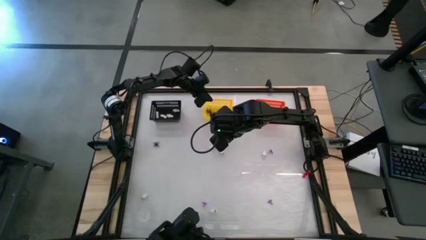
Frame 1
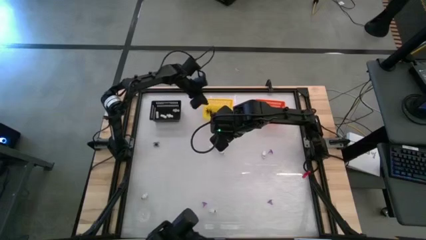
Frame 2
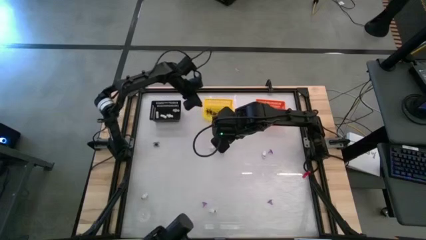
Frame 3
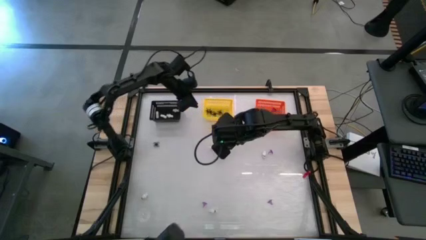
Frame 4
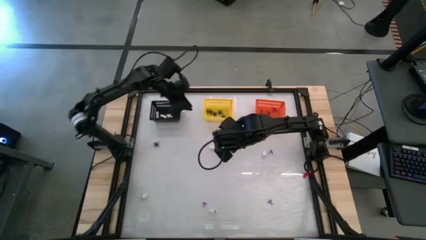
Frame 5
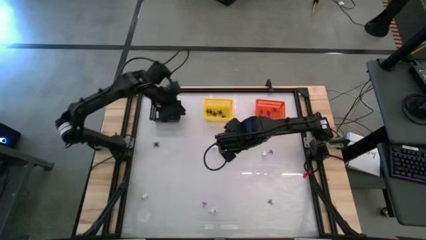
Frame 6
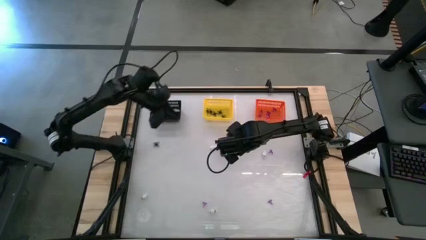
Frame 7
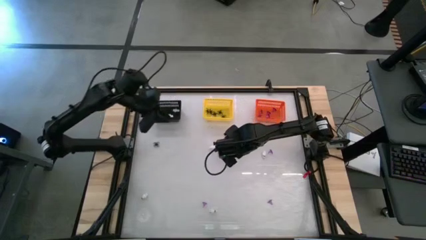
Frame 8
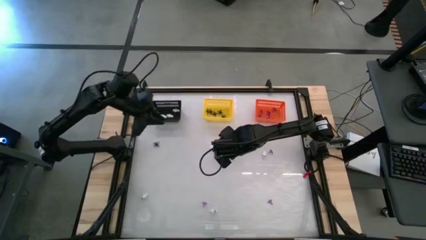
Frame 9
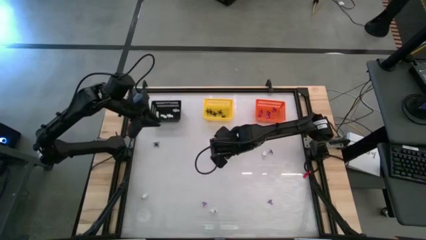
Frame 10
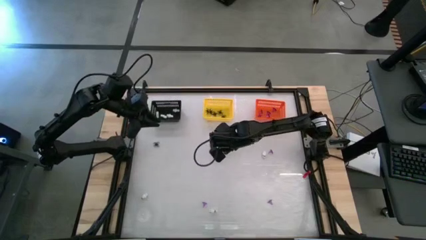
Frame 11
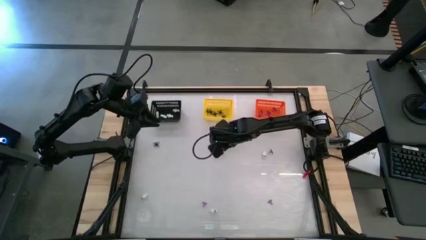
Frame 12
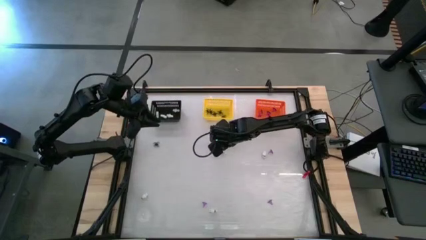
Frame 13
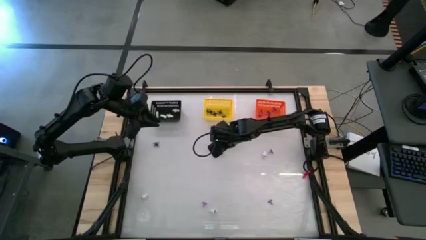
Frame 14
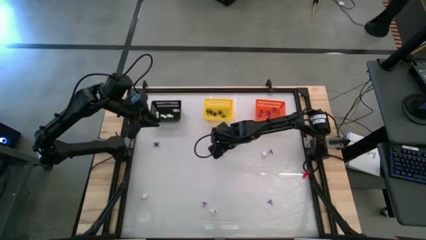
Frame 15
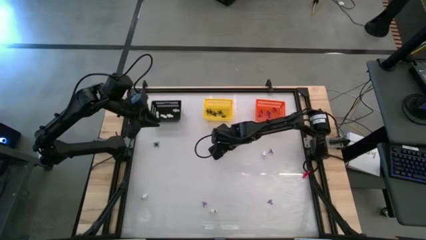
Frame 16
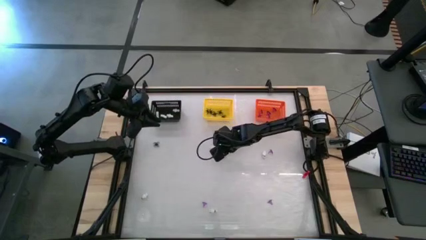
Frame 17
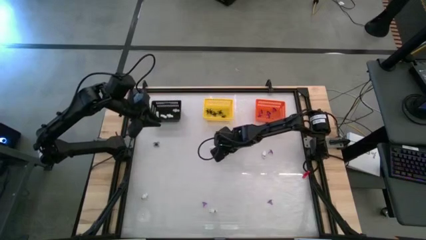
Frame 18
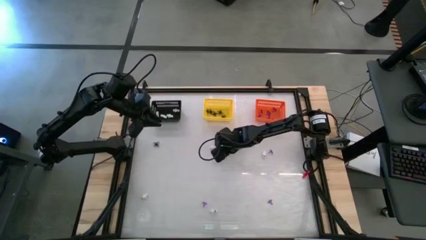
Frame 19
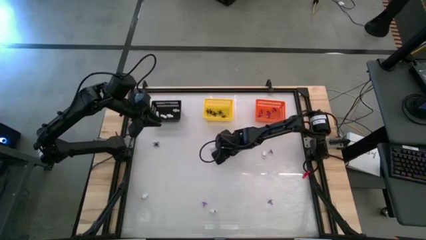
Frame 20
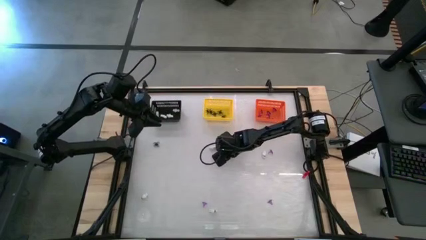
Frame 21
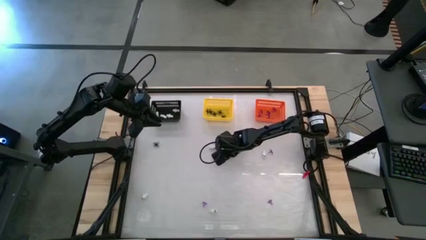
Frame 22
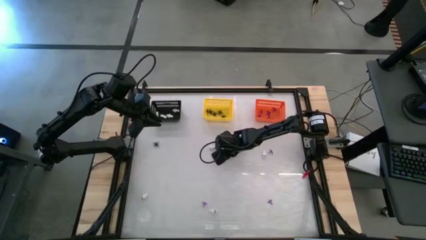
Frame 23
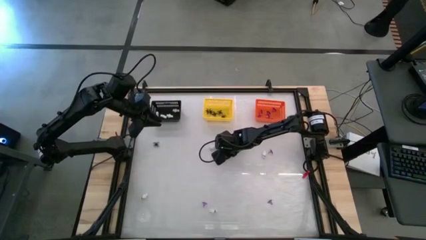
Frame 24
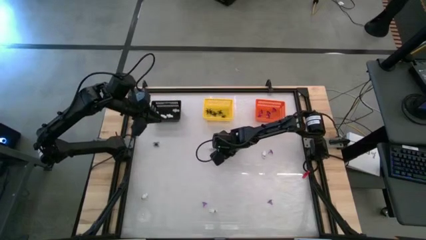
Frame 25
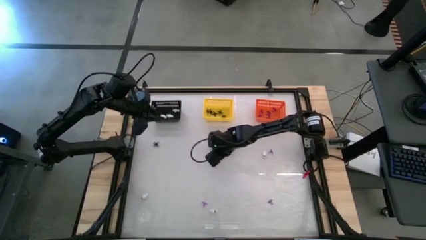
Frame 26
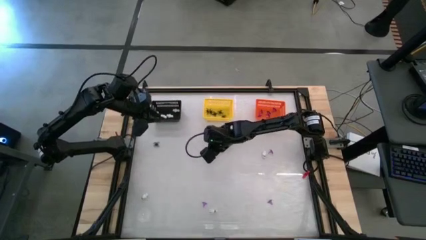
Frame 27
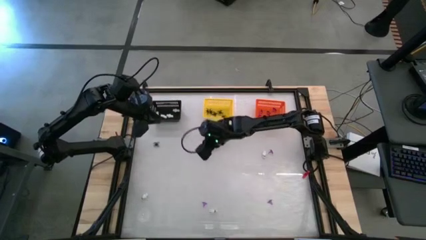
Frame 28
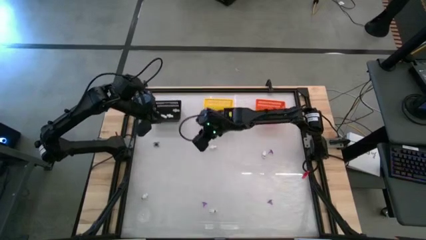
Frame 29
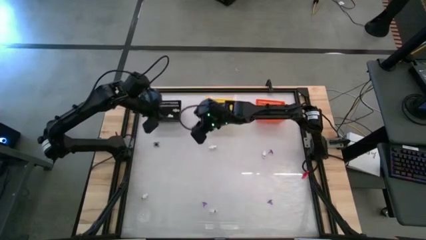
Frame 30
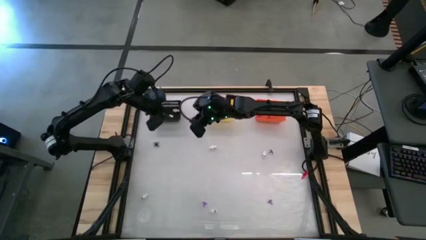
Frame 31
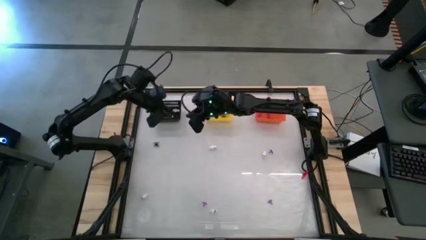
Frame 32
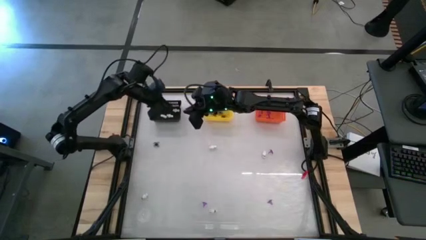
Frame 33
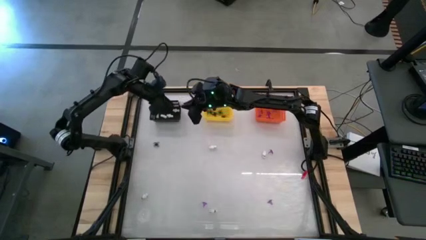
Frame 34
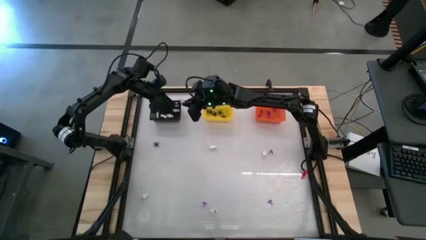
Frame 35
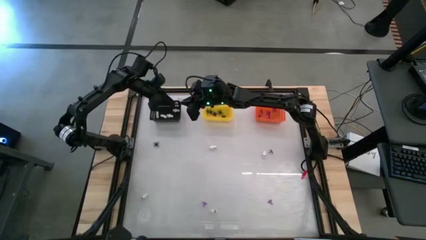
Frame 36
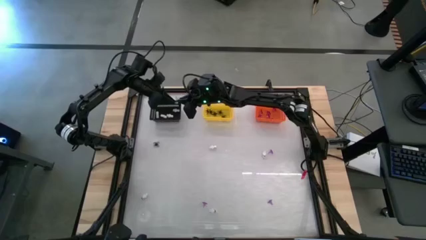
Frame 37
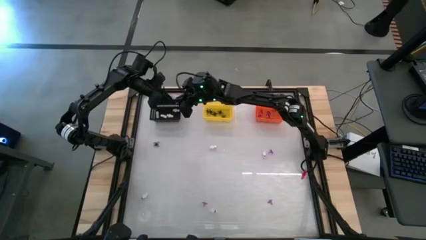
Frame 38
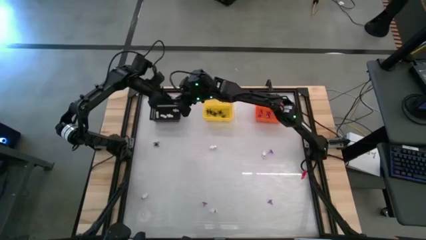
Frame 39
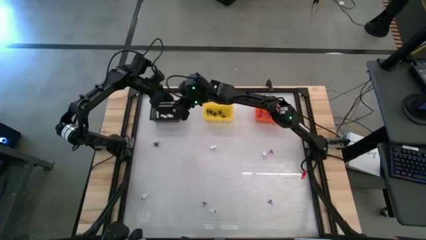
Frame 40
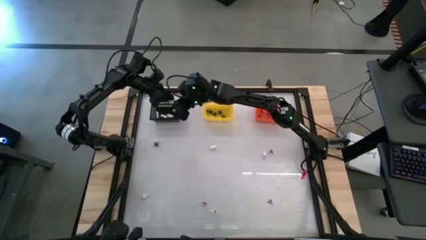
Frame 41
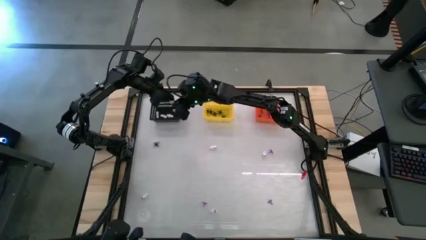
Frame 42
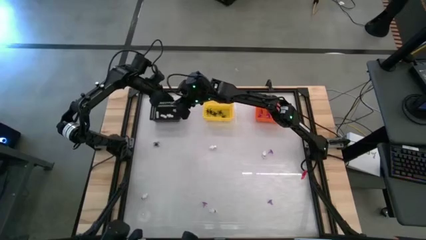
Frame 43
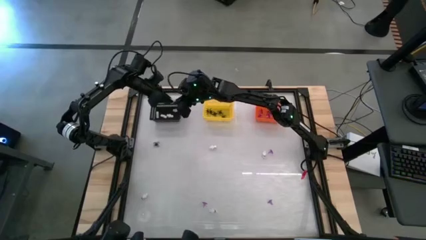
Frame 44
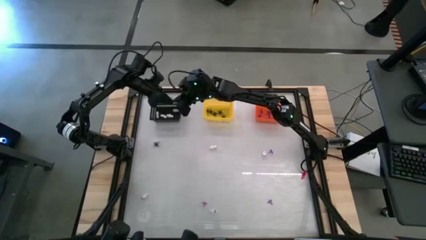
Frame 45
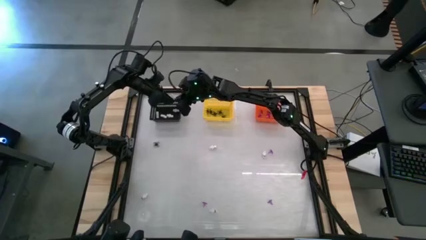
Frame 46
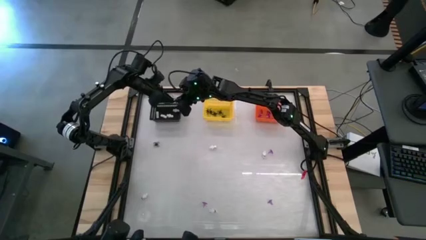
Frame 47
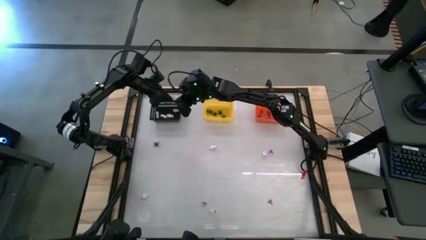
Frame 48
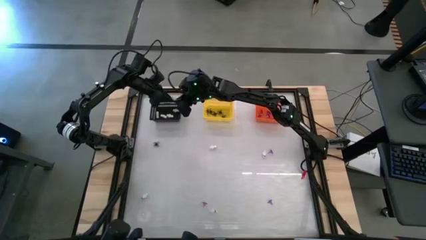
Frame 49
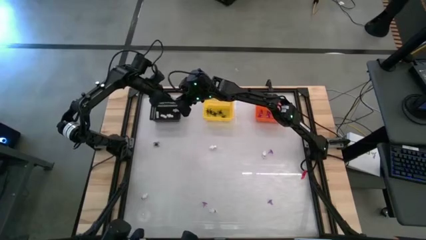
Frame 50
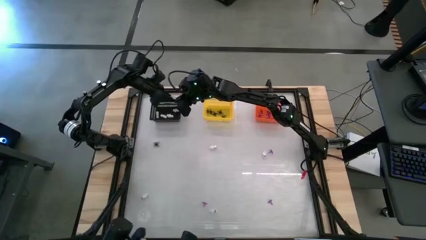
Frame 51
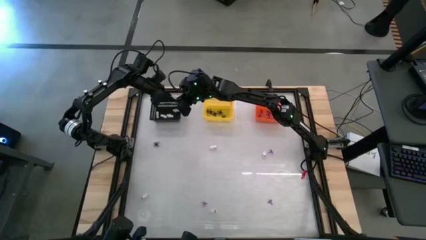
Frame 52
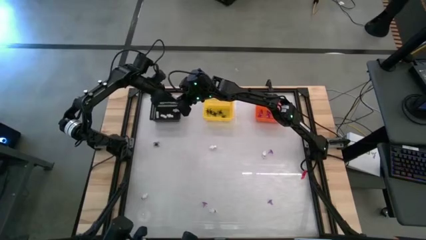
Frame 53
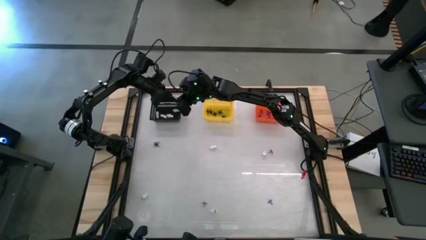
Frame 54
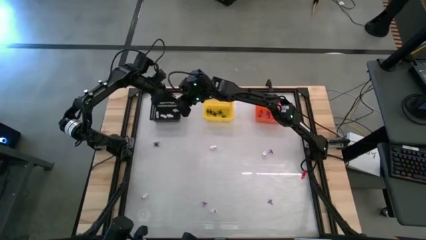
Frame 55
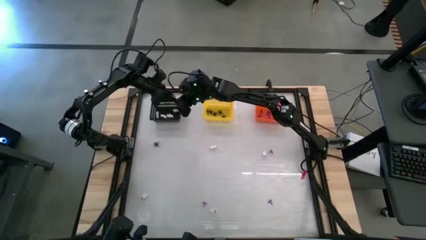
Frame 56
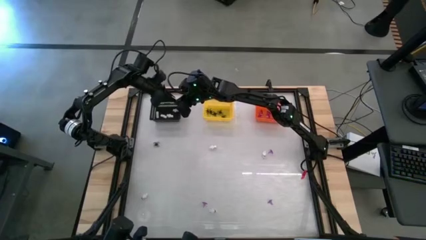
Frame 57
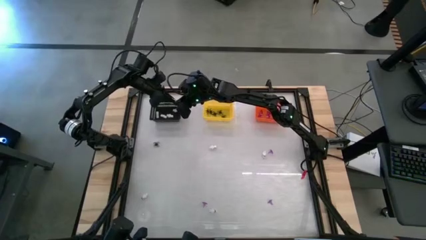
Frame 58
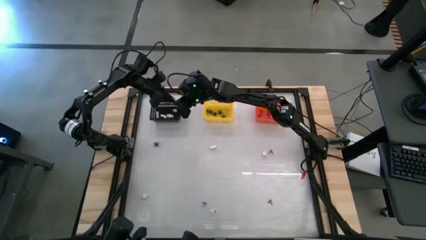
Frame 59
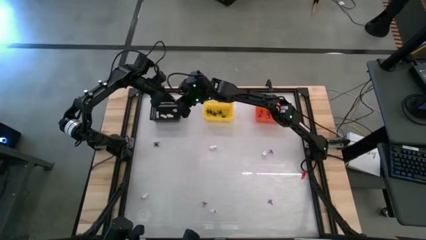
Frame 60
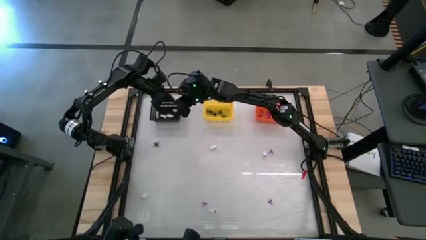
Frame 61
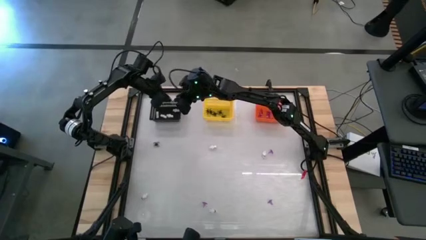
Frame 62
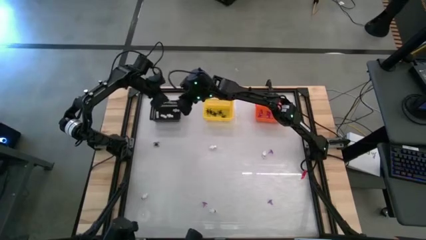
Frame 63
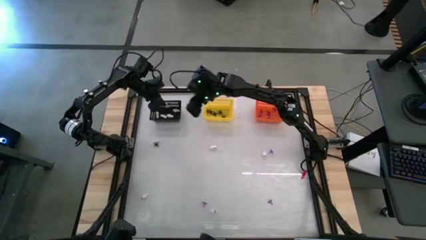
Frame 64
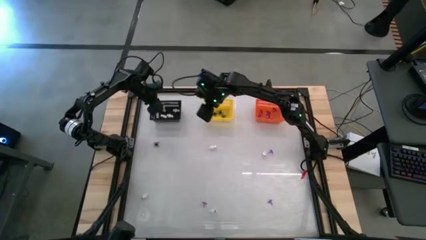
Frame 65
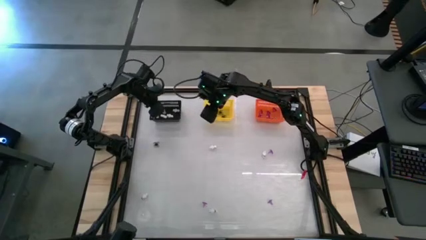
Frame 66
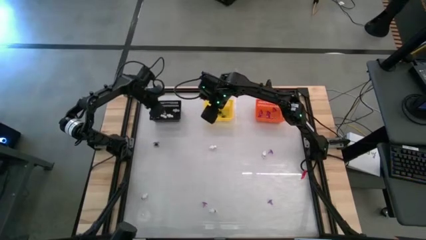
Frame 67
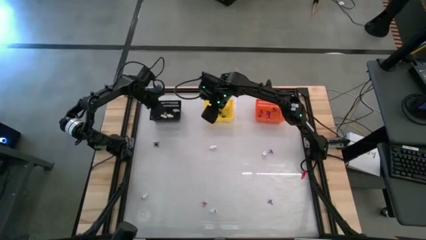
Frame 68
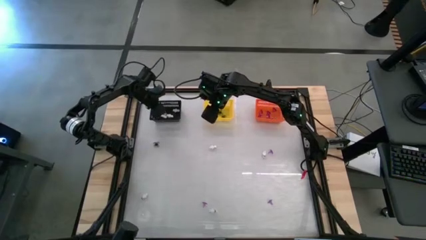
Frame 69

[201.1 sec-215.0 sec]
Task: Sort Halloween decoration
Put the white skeleton toy into the black basket
